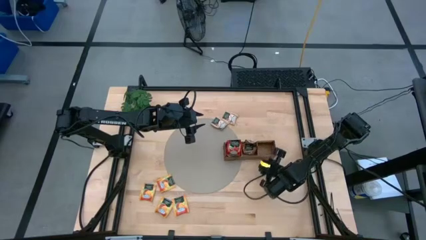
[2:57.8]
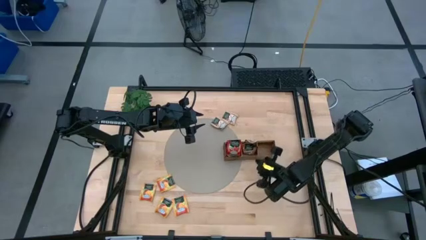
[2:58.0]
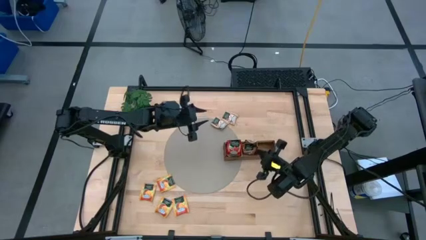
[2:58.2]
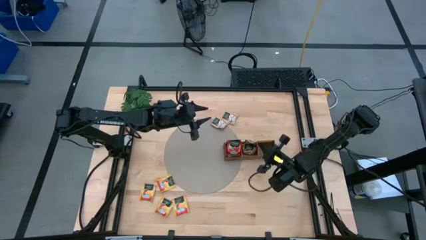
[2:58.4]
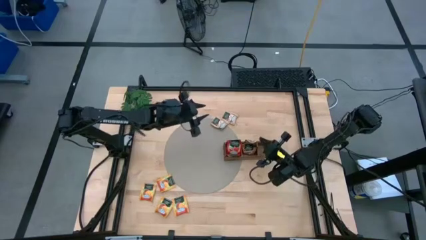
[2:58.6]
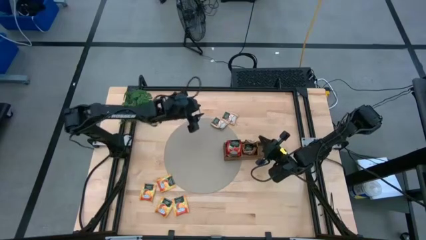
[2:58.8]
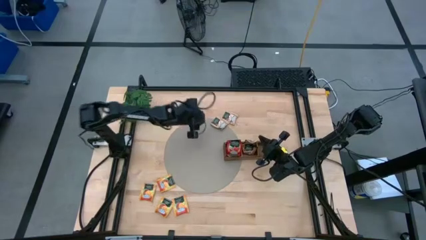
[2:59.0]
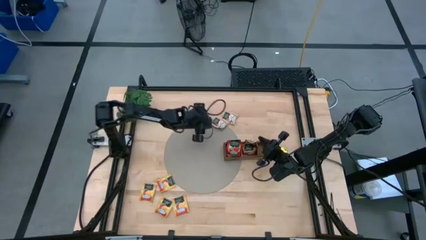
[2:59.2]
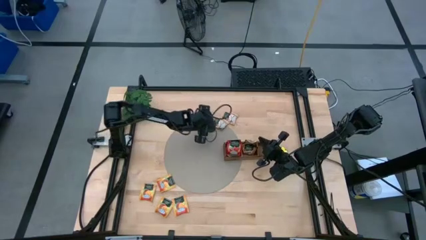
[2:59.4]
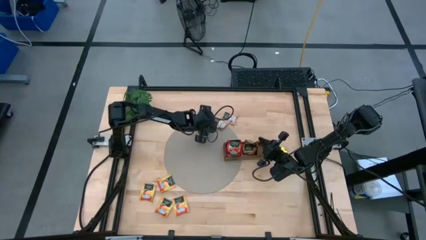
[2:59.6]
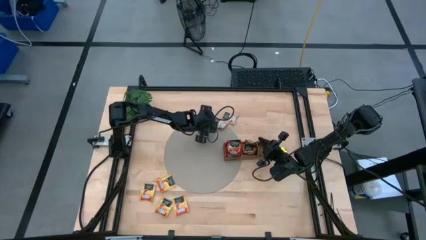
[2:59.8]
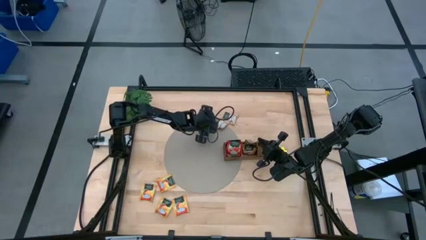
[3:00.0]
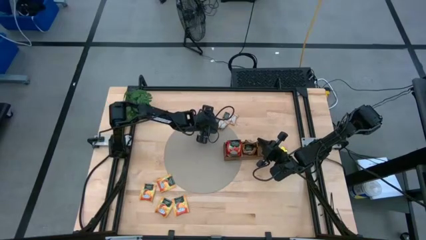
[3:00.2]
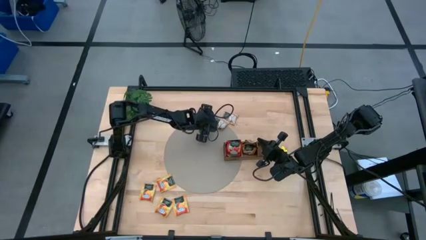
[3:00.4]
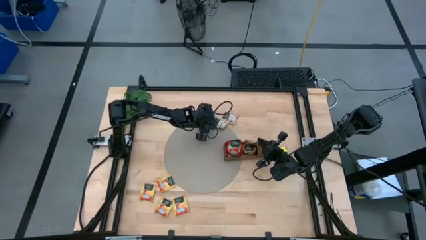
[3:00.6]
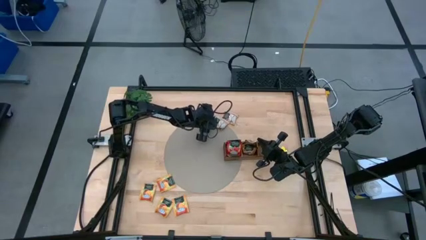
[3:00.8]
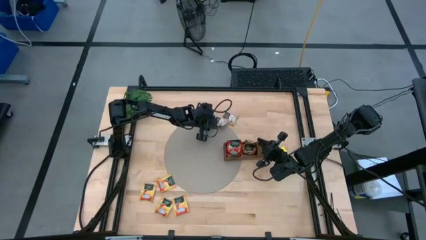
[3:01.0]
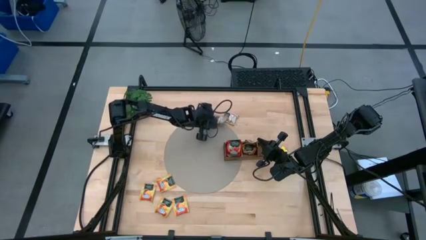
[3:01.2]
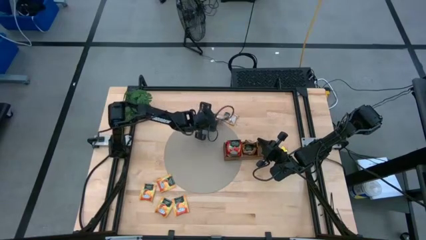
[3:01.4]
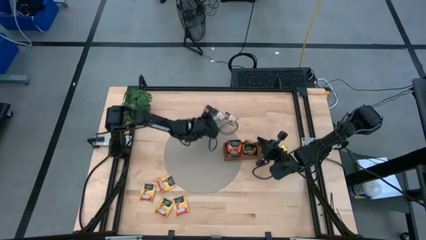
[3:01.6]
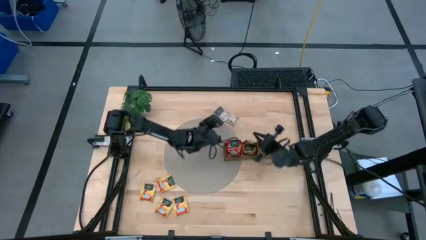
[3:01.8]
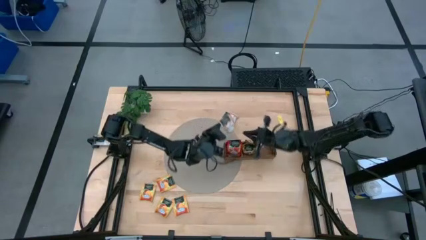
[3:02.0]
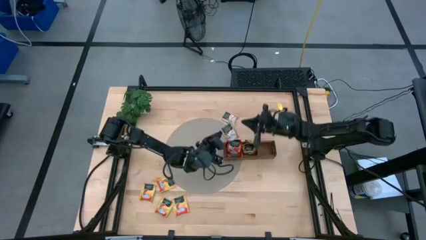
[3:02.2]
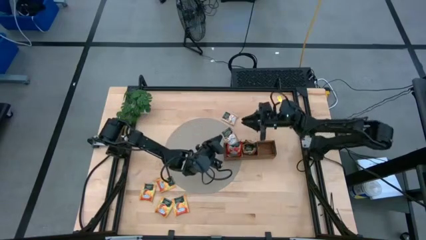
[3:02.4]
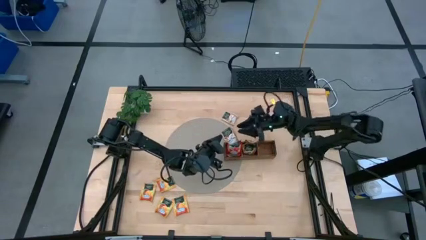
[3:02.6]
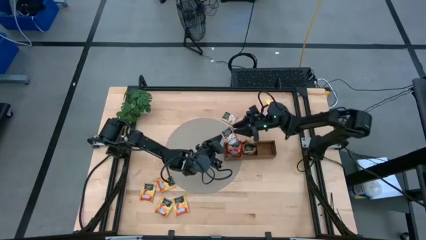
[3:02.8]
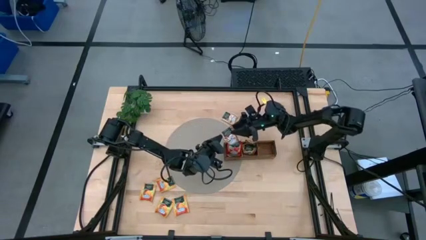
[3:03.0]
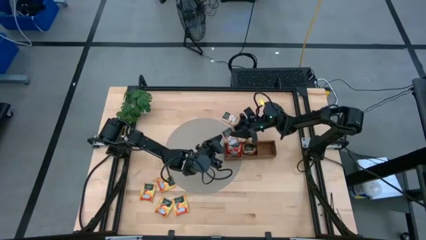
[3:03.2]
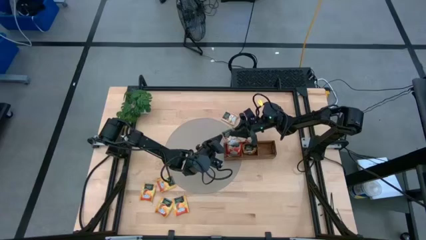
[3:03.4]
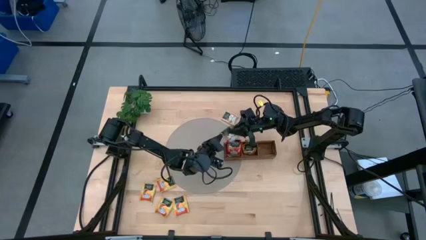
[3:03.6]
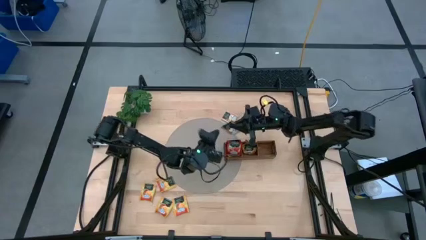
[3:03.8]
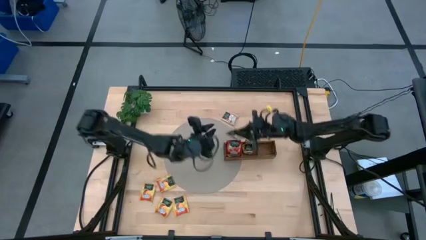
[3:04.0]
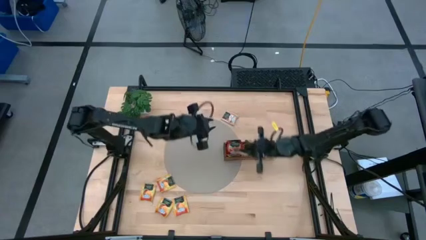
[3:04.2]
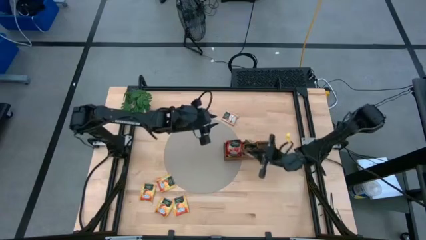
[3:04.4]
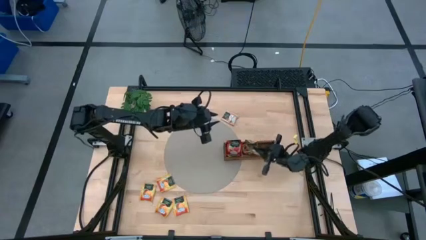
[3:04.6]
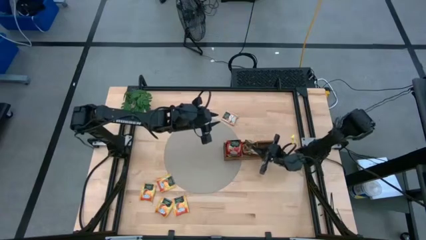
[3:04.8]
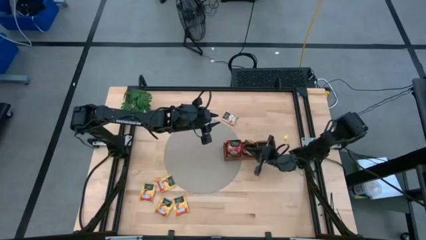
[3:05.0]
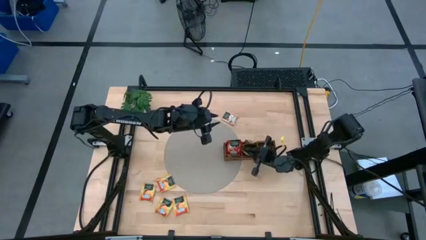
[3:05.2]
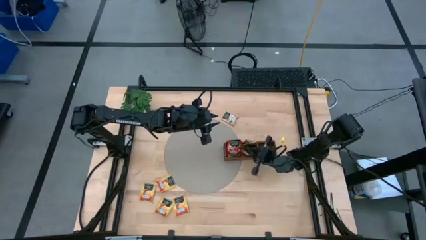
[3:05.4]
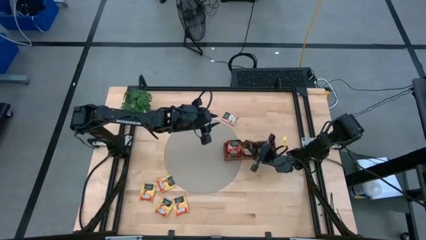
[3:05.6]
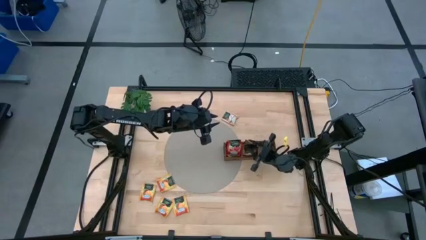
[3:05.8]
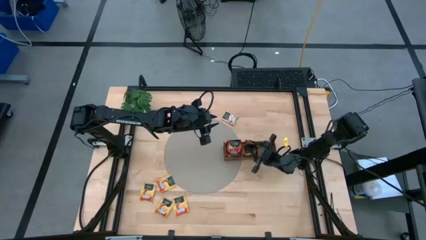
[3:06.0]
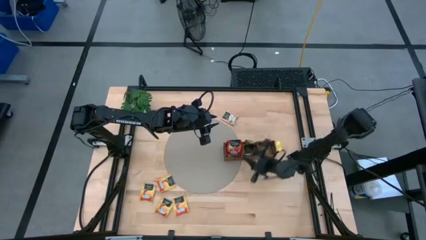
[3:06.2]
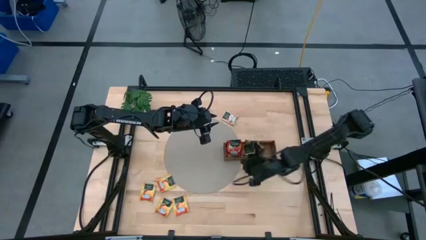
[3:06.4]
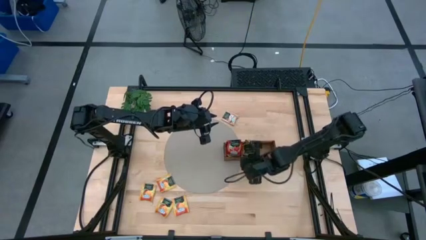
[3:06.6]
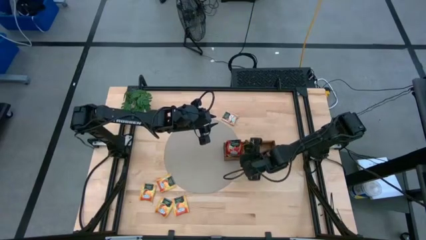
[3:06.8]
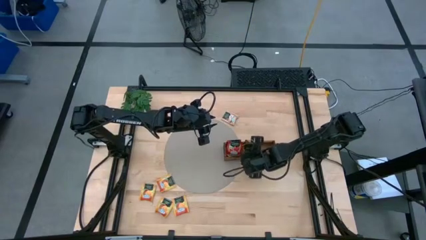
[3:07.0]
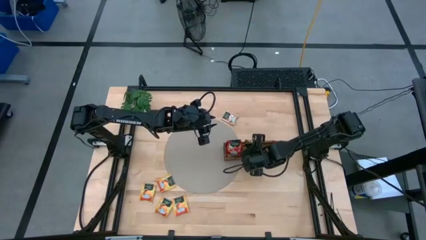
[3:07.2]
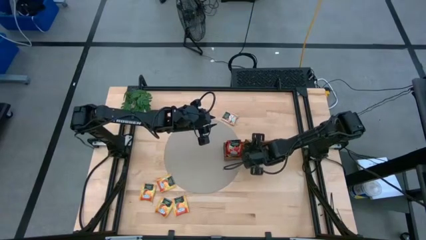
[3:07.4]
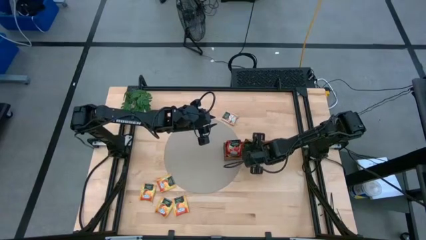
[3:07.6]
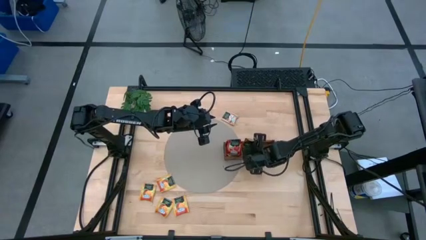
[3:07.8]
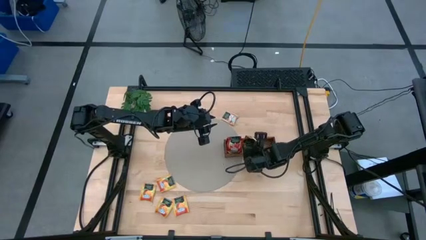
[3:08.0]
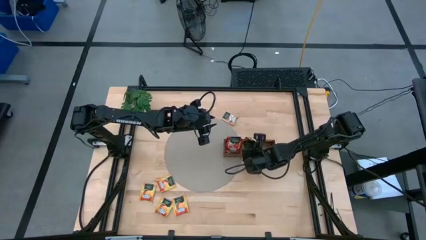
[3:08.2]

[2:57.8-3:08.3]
Task: Pick & Place Tea
Put the brown tea bag into the middle section of the wooden organizer

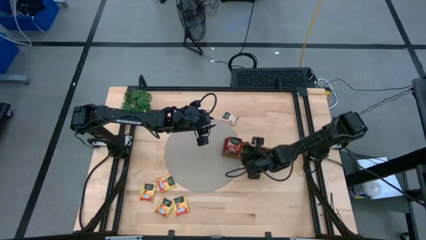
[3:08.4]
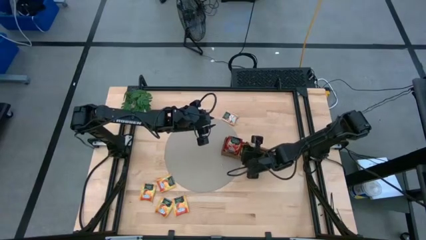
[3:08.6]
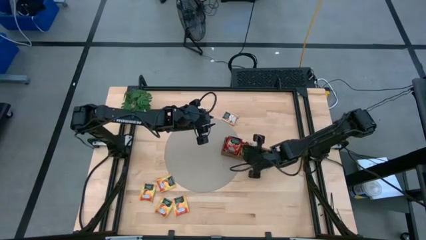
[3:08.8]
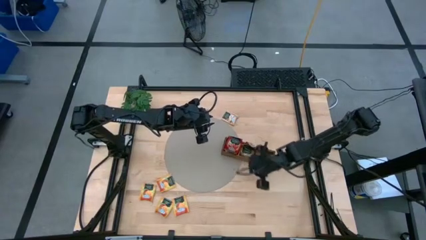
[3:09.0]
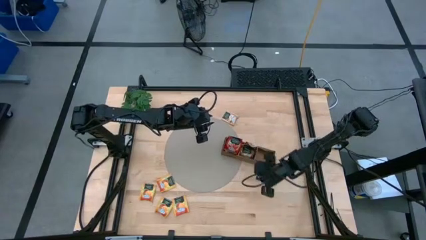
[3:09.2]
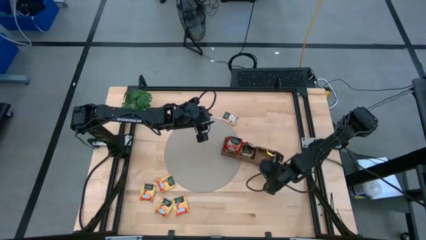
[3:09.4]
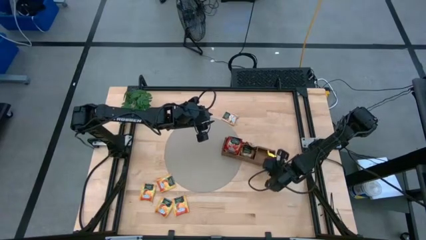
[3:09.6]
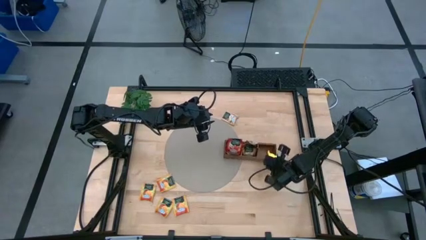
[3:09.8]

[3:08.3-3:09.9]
Adjust the wooden organizer on the table

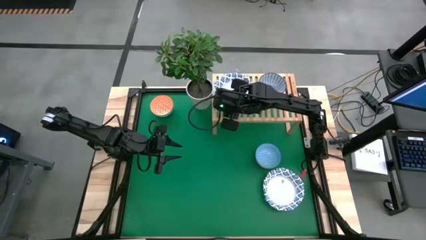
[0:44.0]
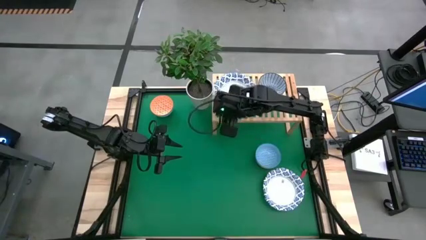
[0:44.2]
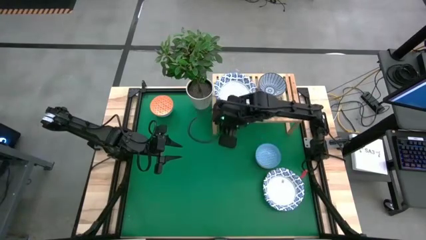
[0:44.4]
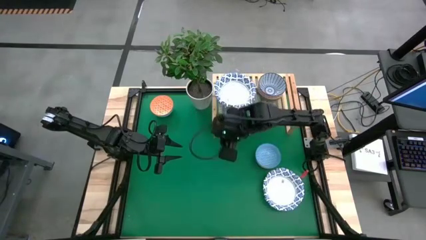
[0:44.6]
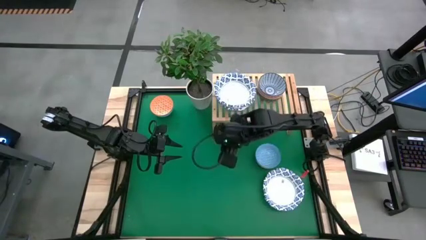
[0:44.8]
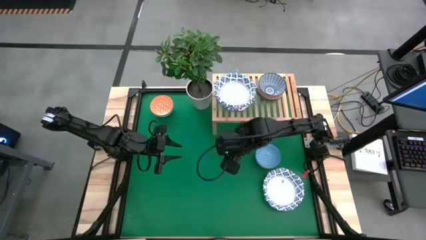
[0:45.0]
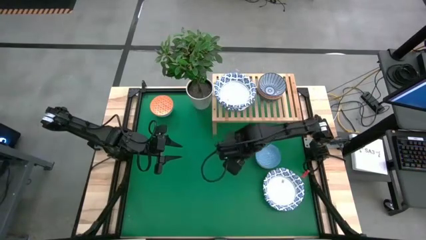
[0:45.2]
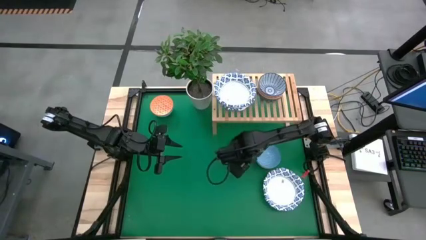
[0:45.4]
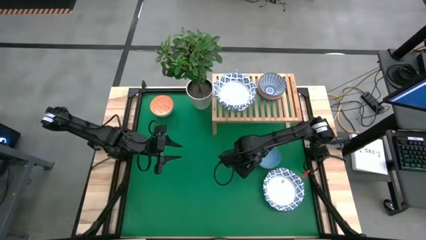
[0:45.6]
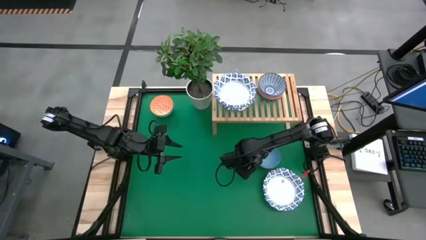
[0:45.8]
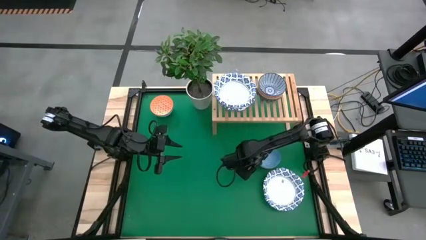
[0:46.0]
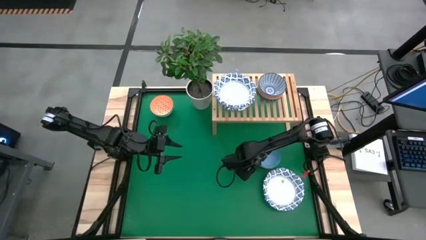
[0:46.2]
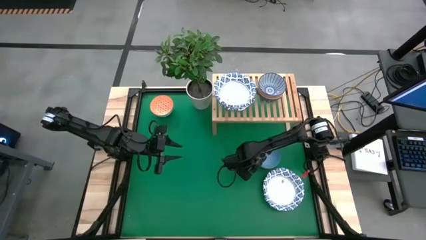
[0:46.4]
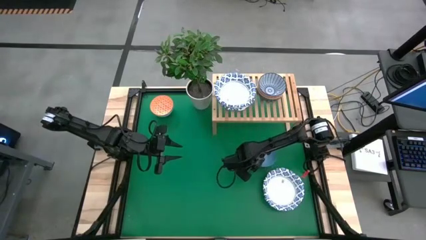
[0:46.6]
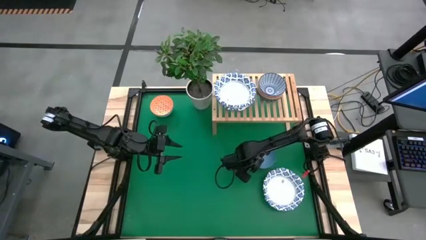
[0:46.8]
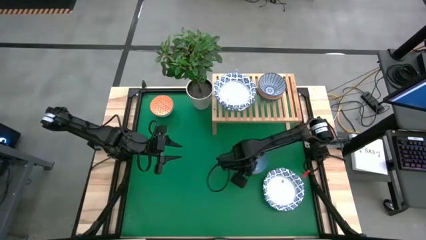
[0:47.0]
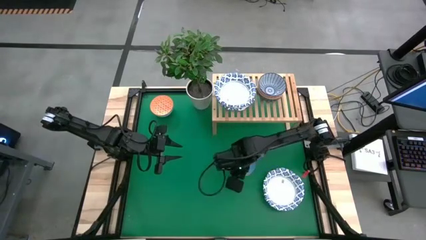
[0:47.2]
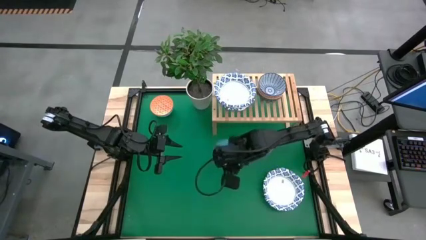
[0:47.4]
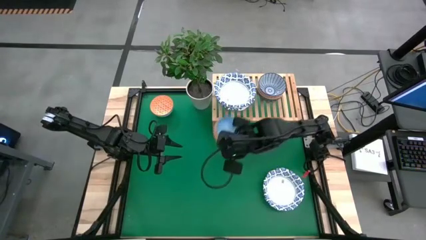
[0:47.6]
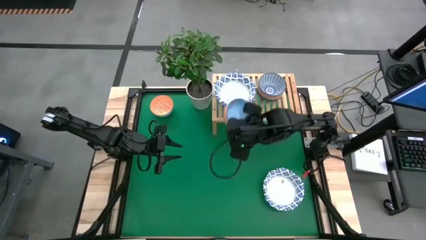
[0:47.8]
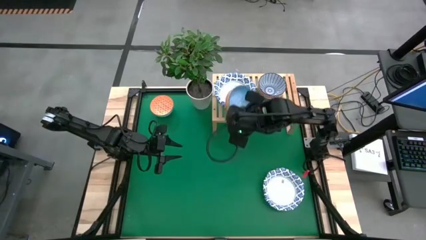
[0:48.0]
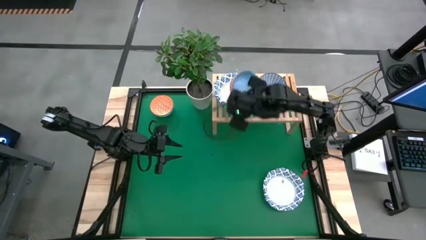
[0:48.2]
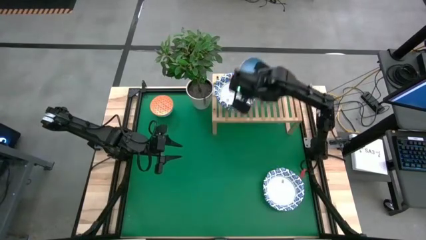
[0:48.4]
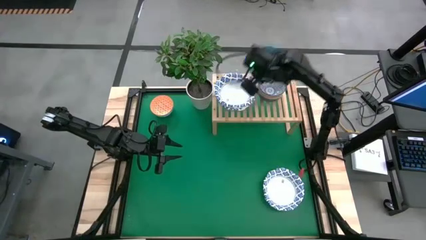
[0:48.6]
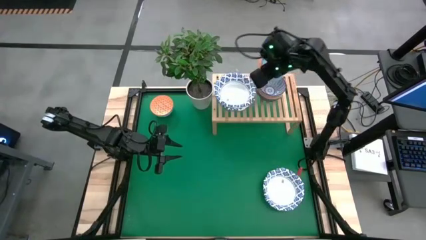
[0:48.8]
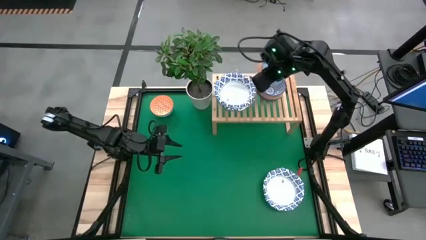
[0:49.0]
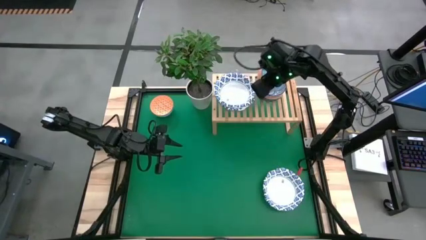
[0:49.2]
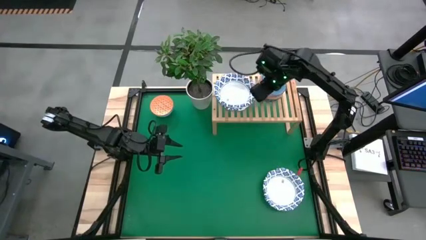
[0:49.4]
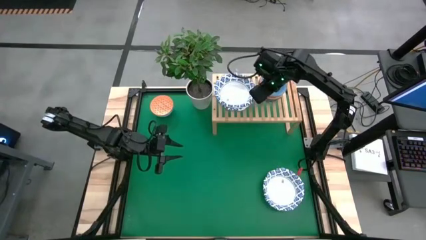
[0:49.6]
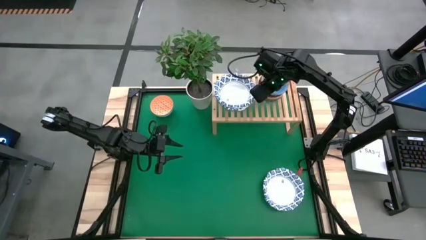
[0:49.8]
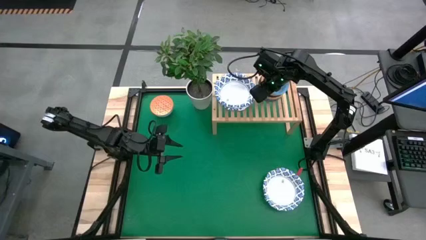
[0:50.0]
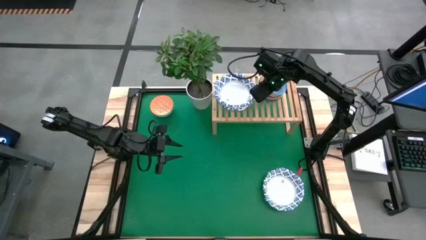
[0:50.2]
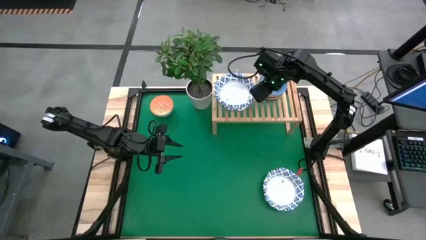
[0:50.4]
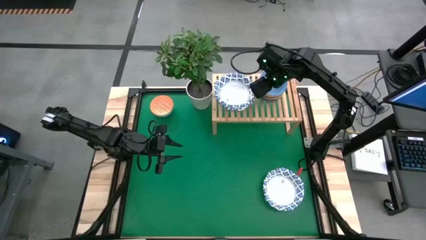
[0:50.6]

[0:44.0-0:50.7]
Task: Place and stack bowls onto a shelf
Stack the light blue bowl on top of the blue bowl on the shelf
